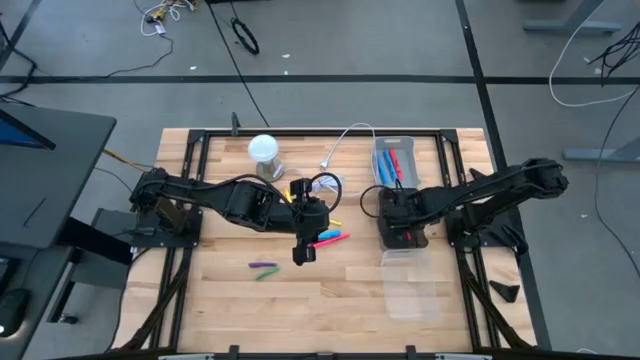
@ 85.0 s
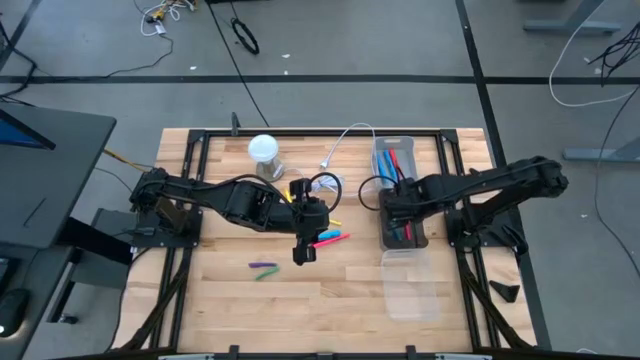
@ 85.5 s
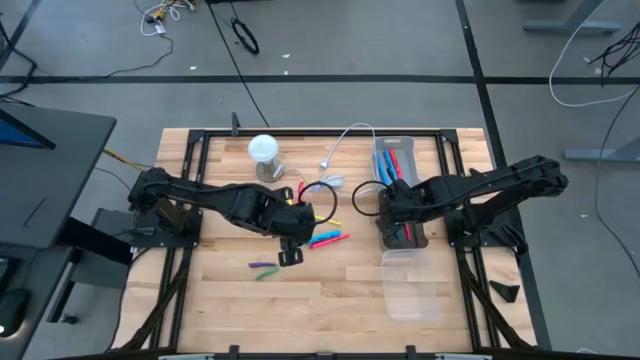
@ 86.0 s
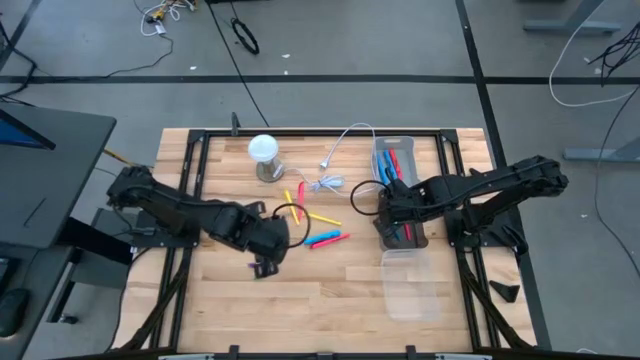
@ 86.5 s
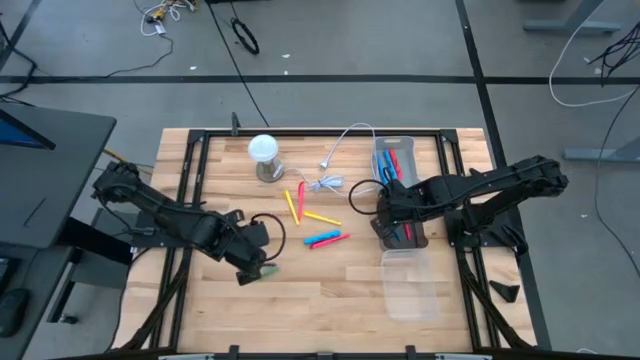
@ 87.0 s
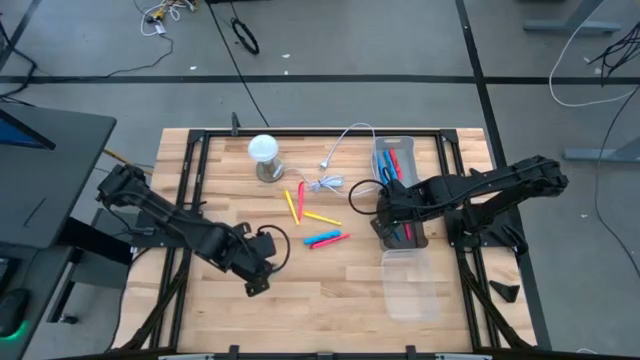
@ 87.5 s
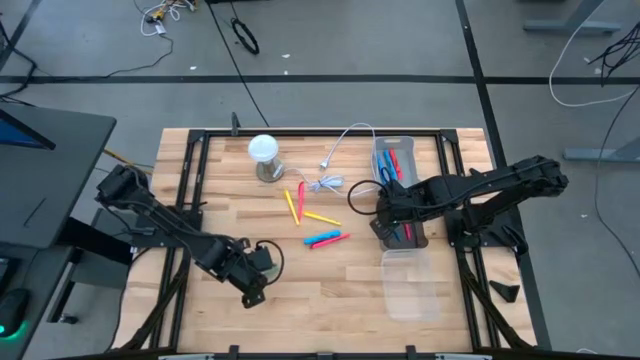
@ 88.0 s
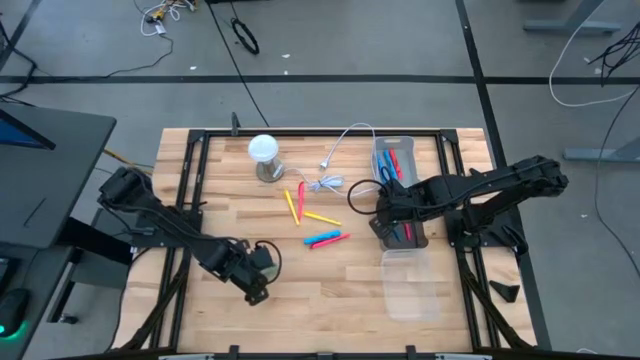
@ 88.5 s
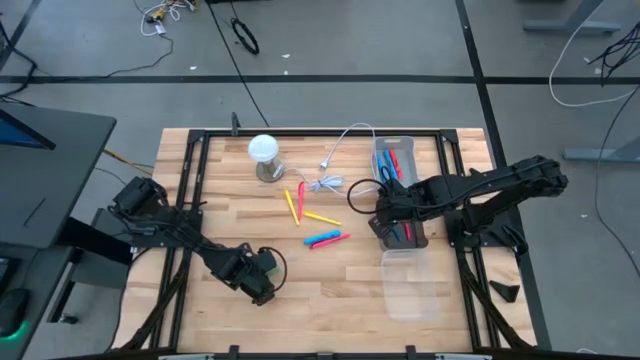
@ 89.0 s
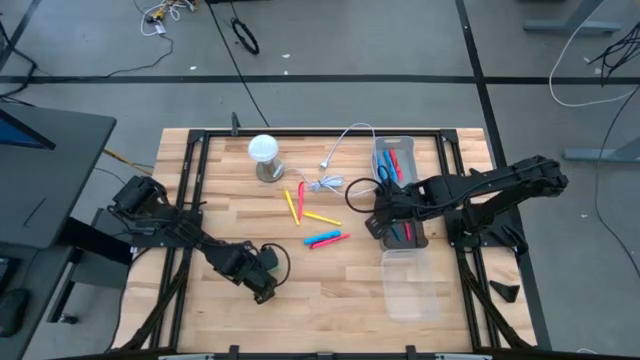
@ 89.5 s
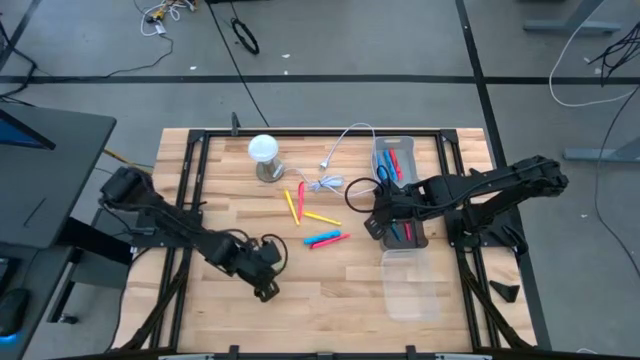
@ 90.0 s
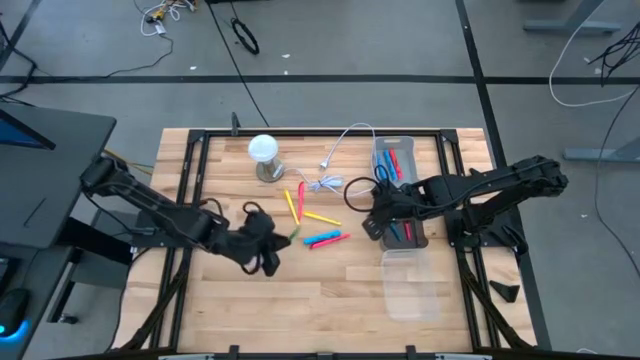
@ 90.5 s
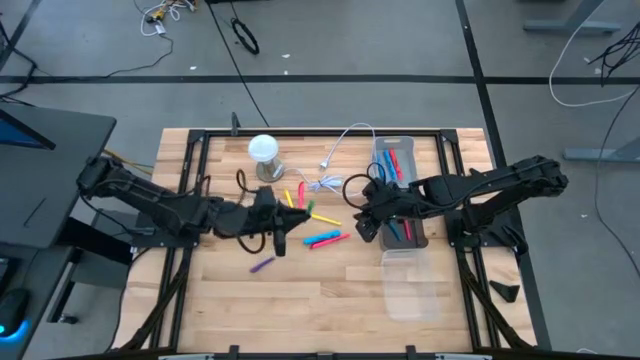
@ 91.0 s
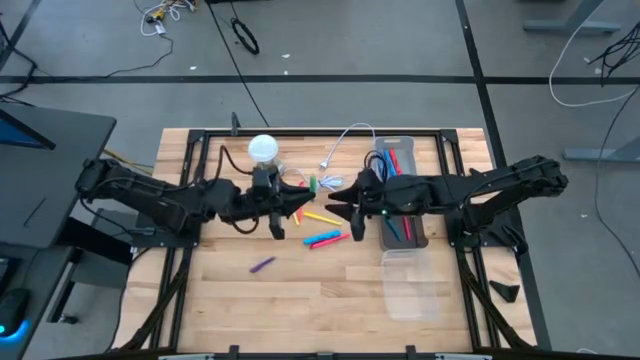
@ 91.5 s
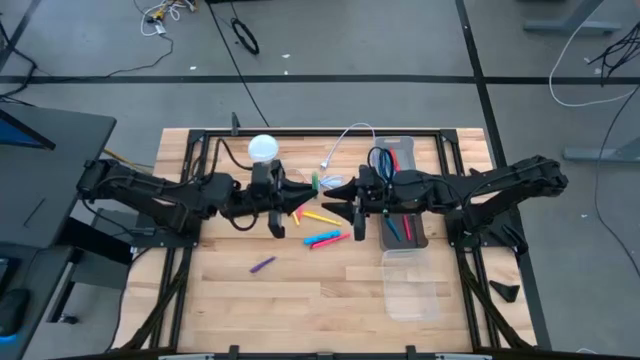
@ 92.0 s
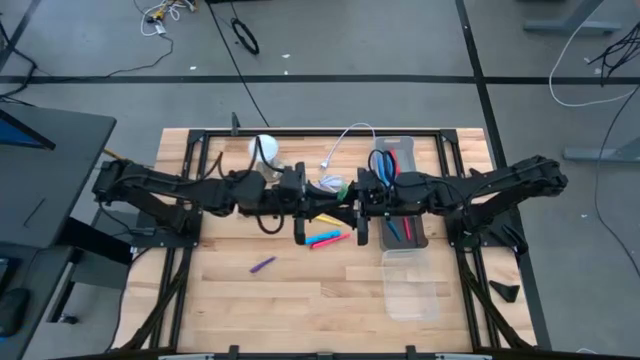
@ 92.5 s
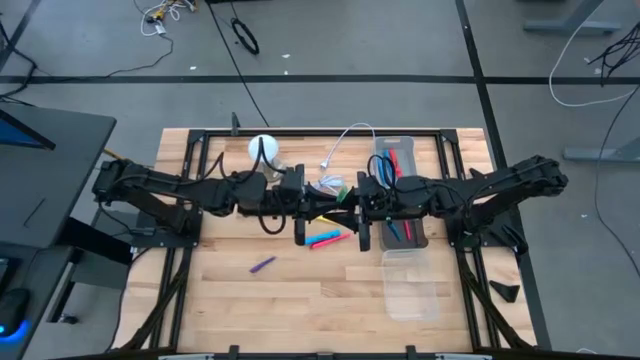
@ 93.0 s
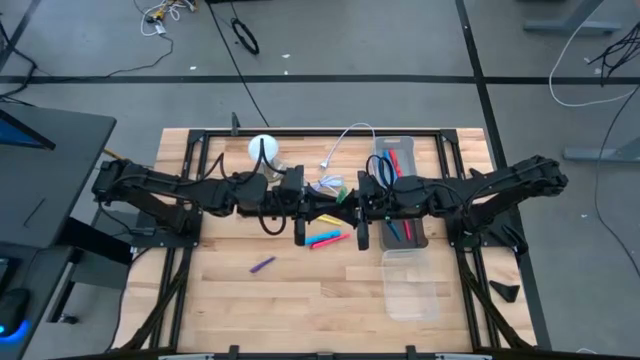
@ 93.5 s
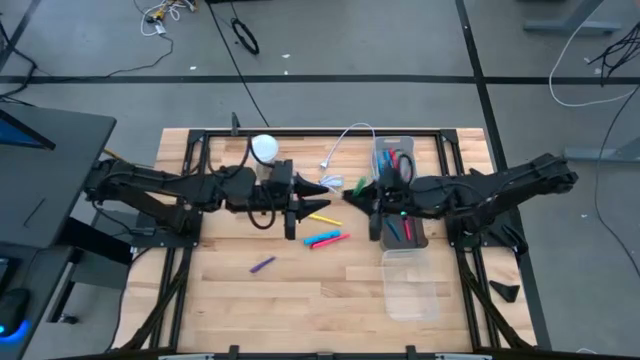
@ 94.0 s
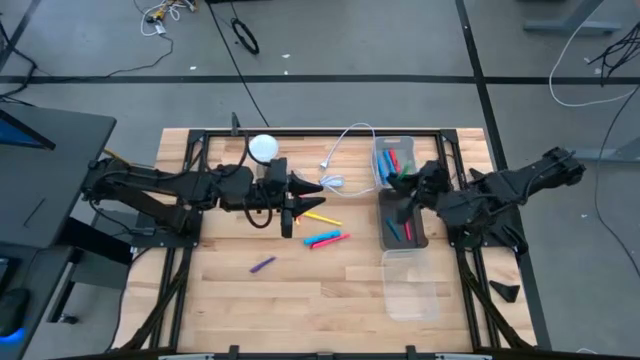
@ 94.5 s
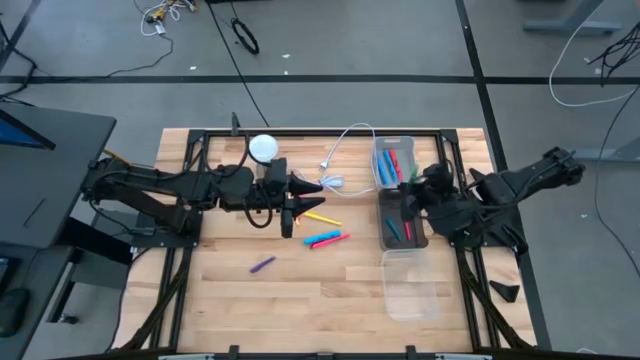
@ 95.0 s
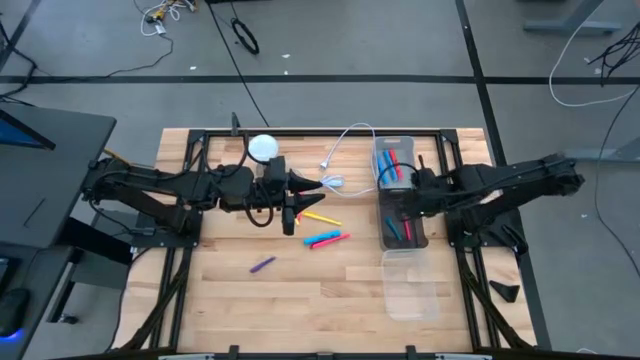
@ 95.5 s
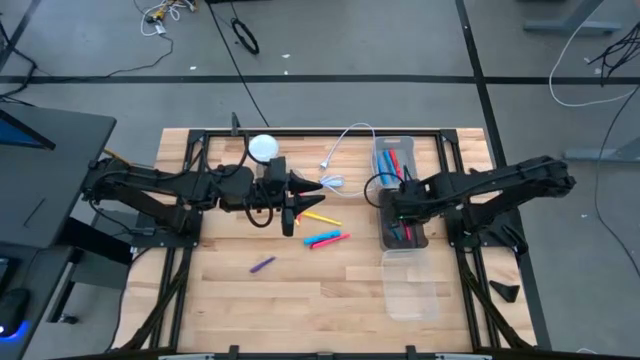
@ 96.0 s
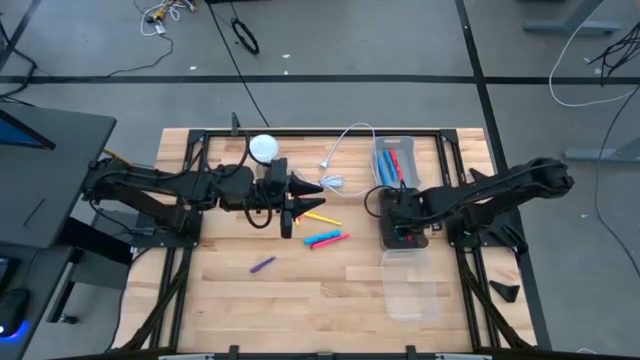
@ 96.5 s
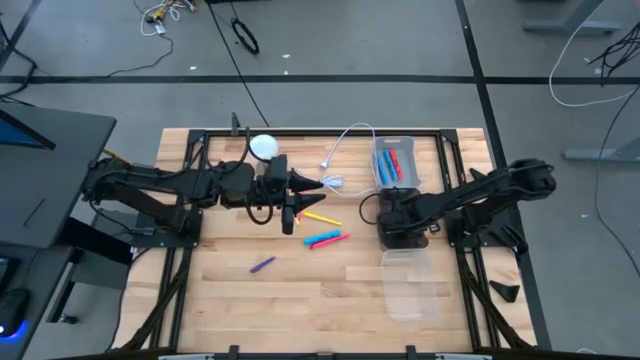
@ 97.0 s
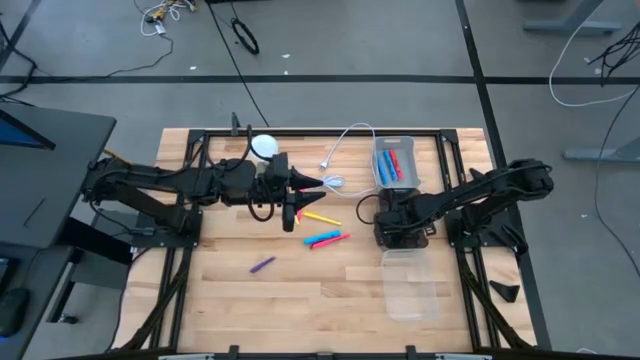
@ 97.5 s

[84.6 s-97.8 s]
Task: Pick & Place Markers
Put the green mini marker into the black bin

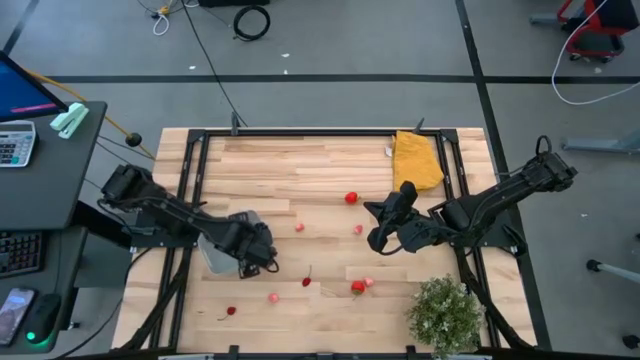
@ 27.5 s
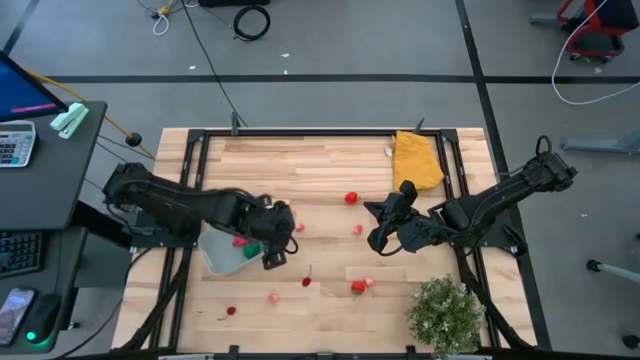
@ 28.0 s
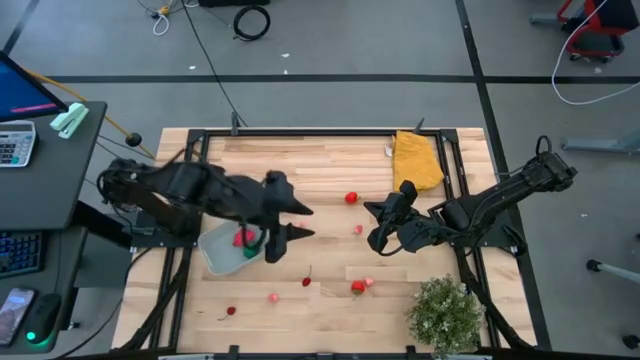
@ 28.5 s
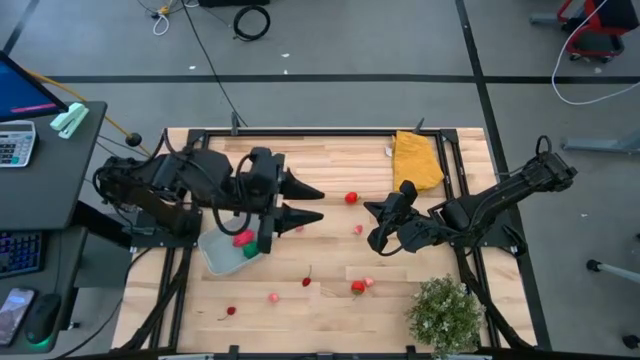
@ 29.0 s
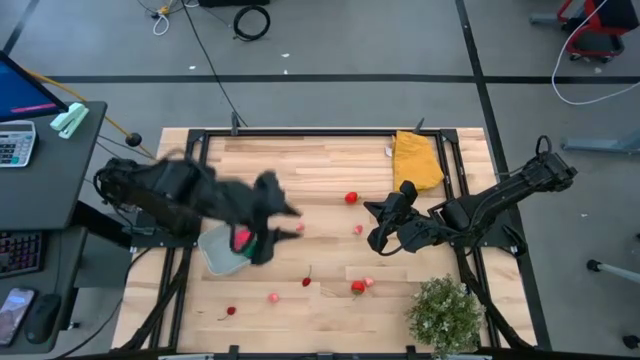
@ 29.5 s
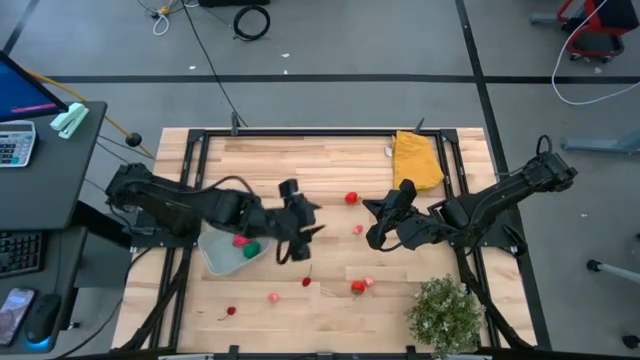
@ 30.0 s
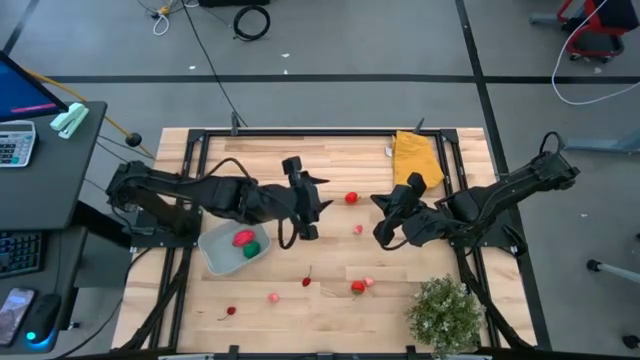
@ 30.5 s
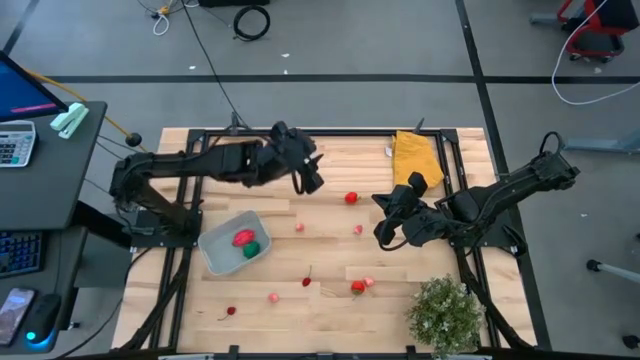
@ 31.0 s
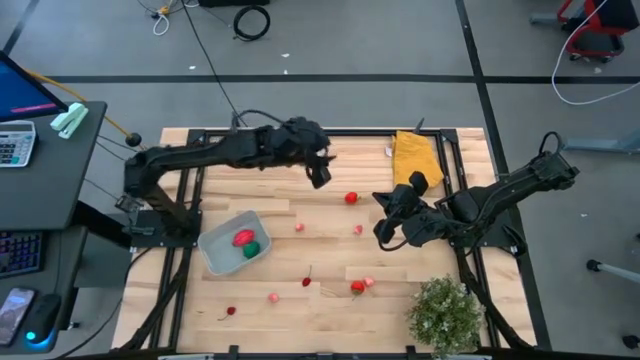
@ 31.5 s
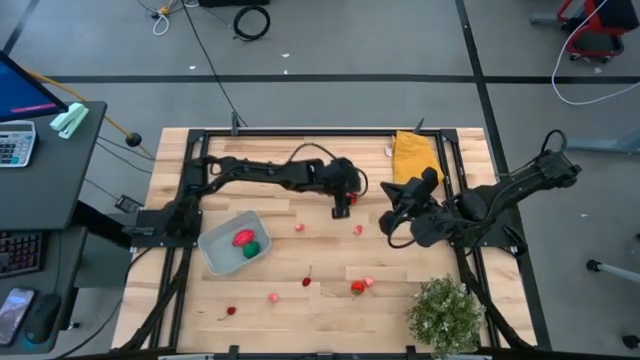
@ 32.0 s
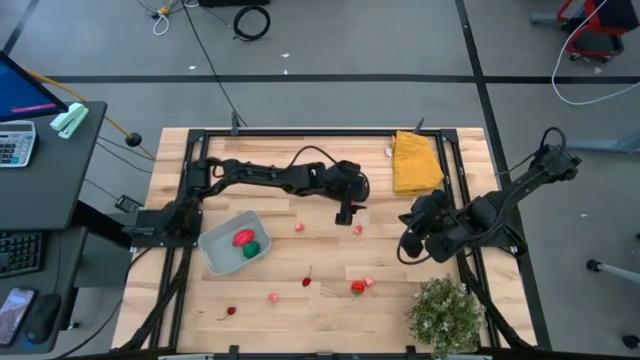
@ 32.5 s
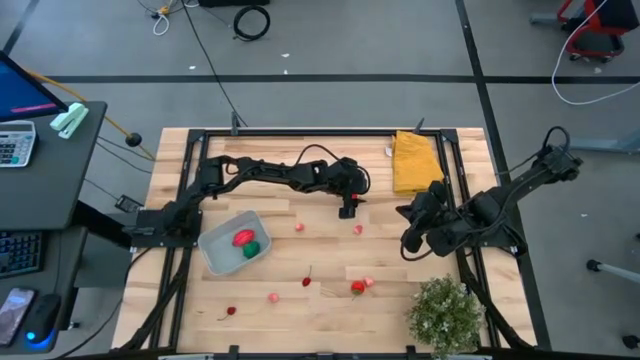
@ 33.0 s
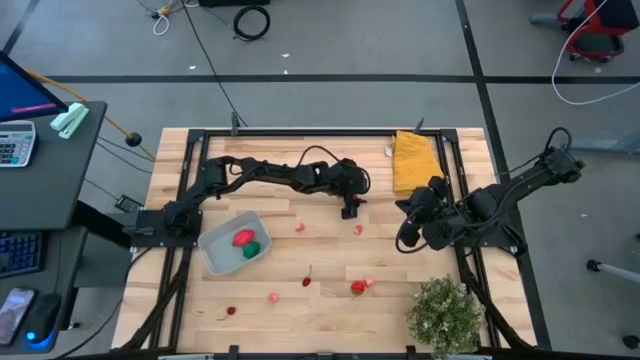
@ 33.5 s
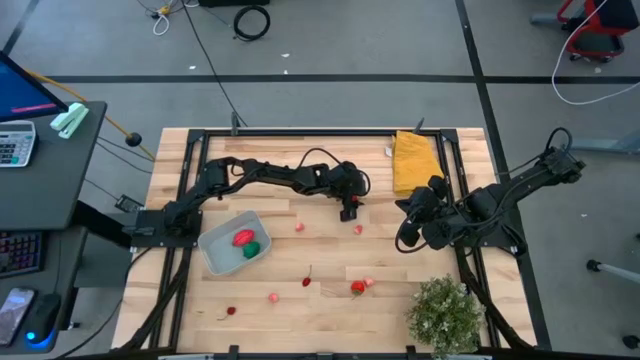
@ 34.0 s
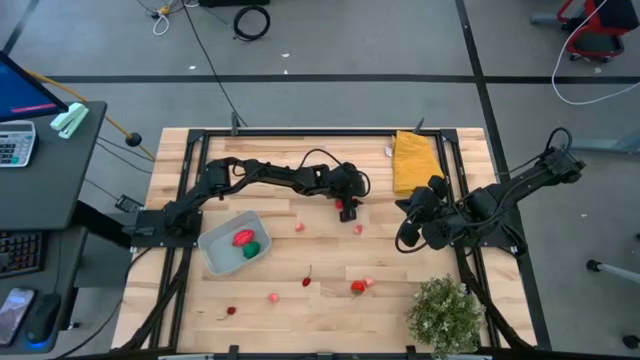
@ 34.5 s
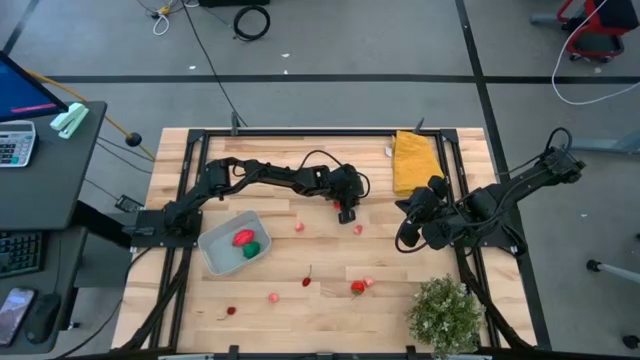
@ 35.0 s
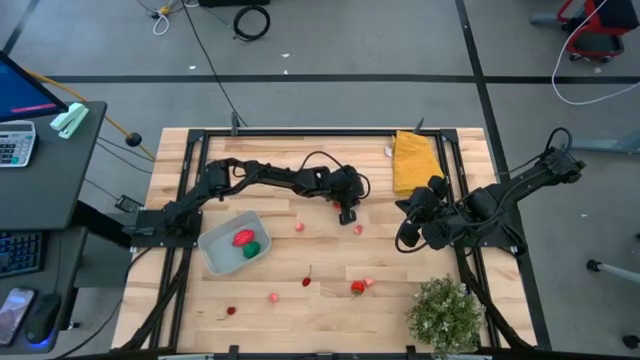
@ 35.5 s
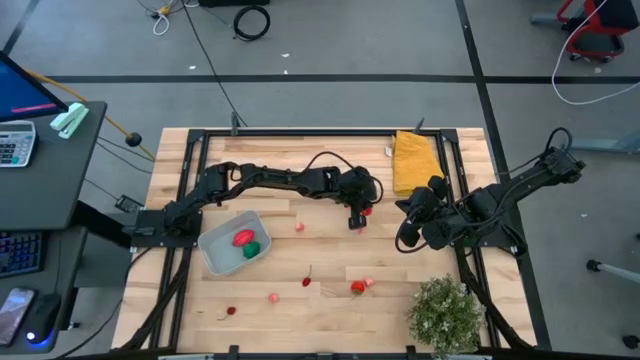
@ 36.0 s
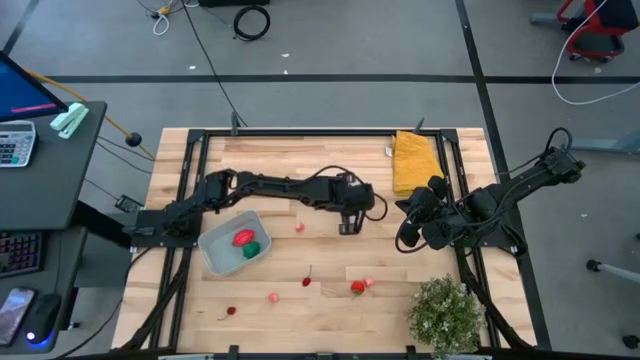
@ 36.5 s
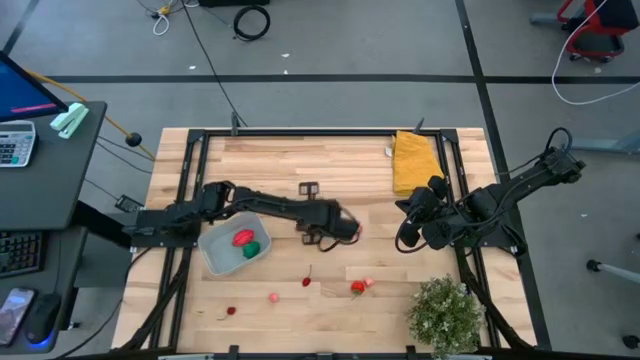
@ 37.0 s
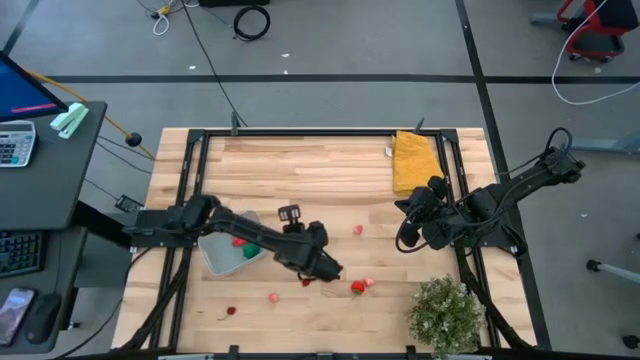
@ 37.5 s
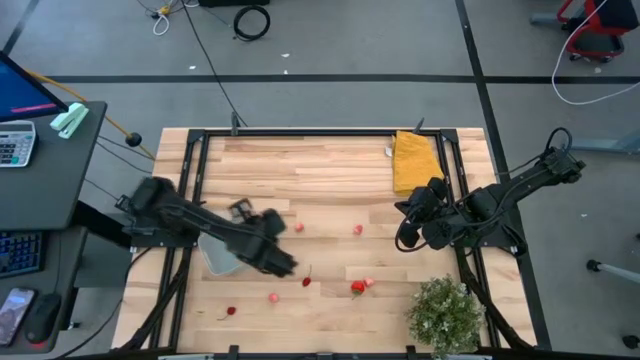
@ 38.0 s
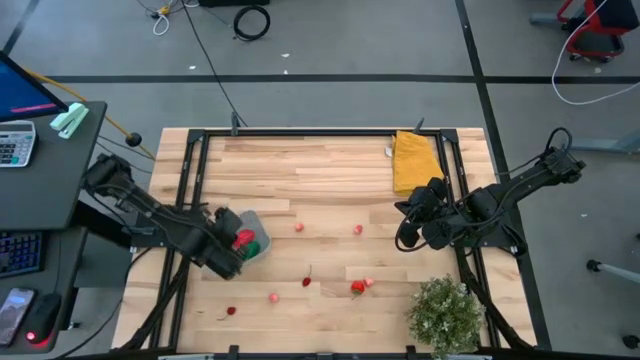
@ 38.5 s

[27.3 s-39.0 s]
Task: Pick and placing Produce into tupperware
Put the top red strawberry into the gray bin
